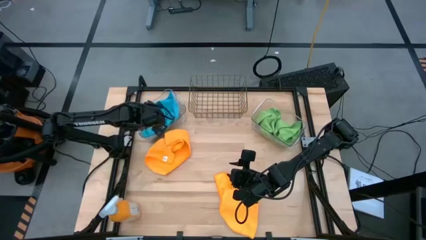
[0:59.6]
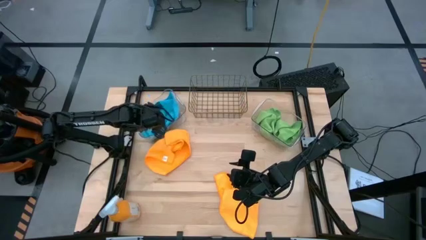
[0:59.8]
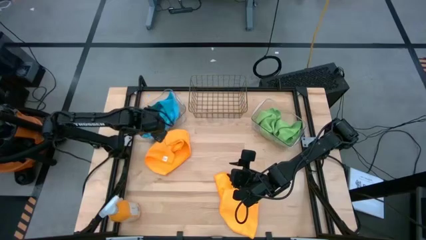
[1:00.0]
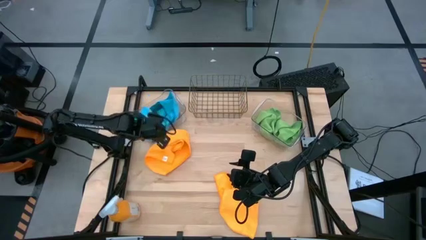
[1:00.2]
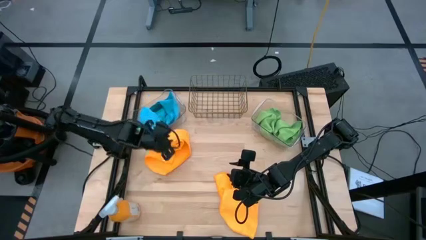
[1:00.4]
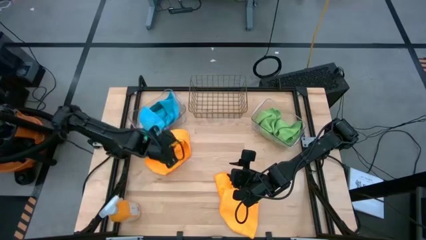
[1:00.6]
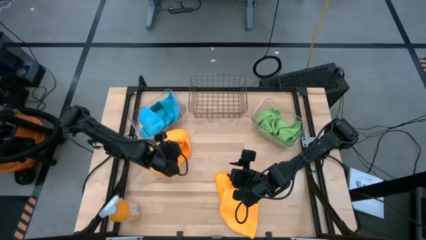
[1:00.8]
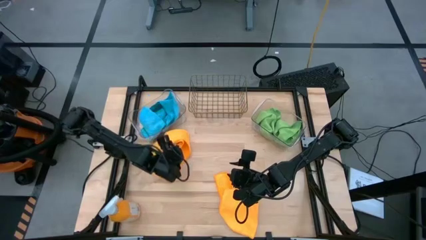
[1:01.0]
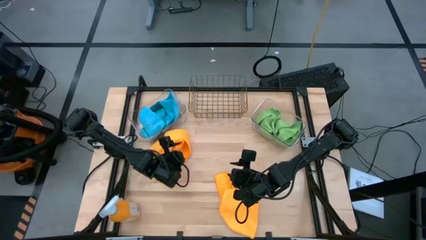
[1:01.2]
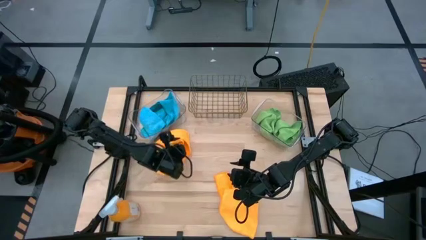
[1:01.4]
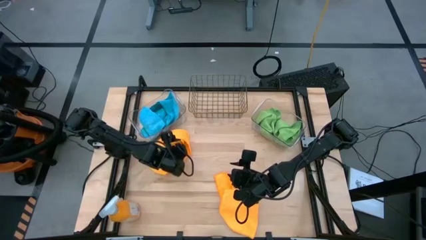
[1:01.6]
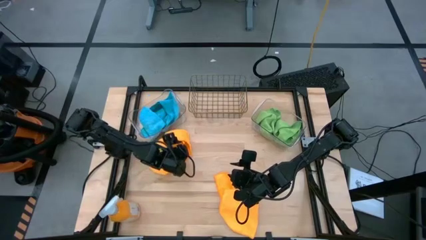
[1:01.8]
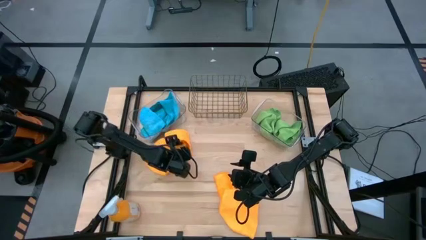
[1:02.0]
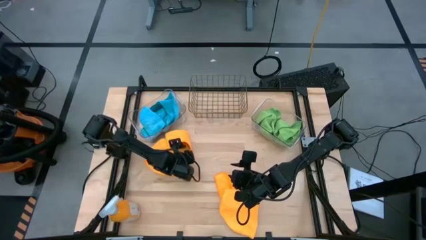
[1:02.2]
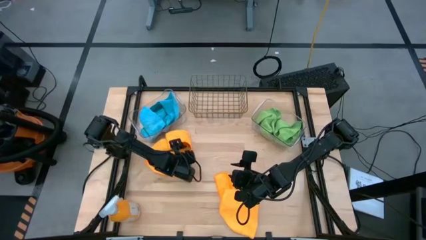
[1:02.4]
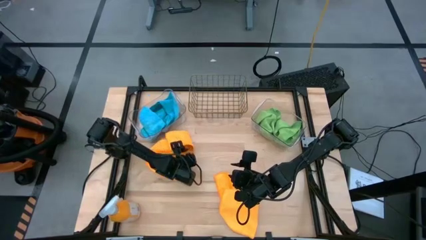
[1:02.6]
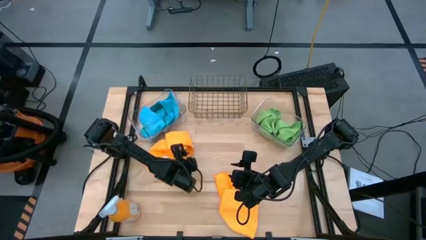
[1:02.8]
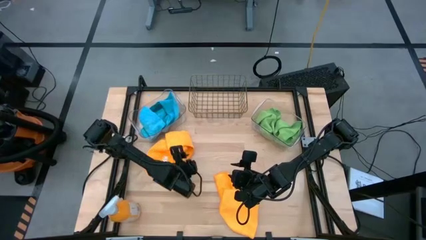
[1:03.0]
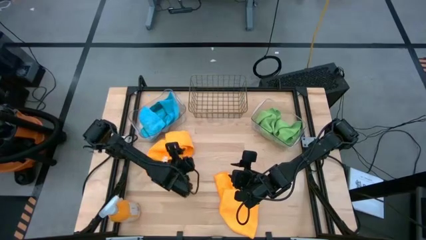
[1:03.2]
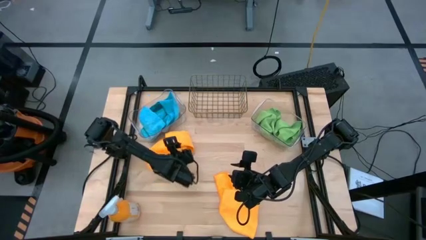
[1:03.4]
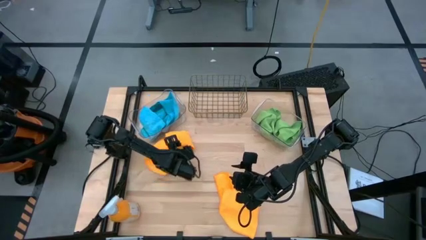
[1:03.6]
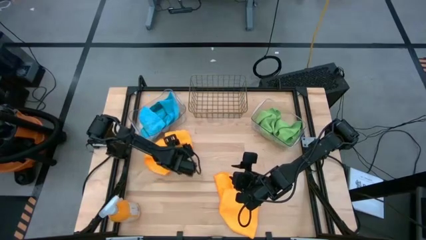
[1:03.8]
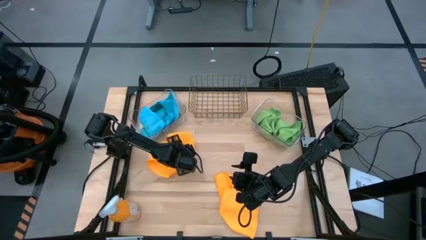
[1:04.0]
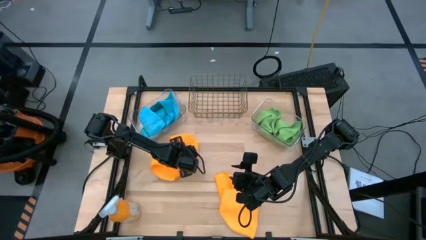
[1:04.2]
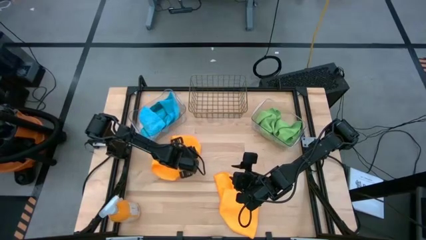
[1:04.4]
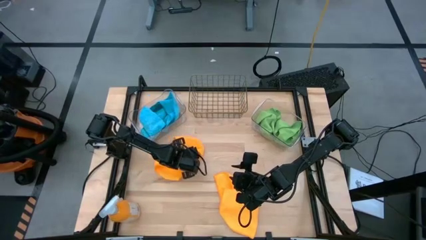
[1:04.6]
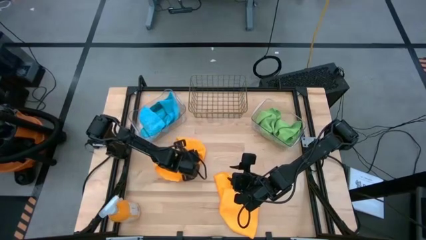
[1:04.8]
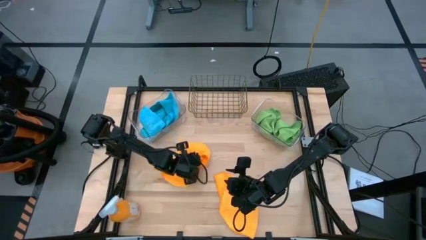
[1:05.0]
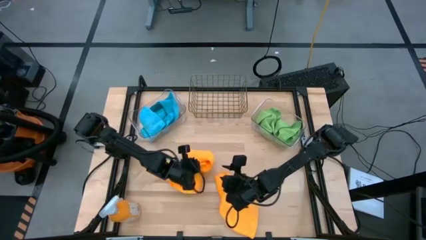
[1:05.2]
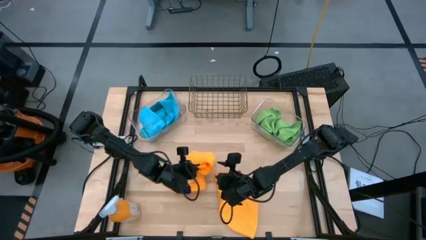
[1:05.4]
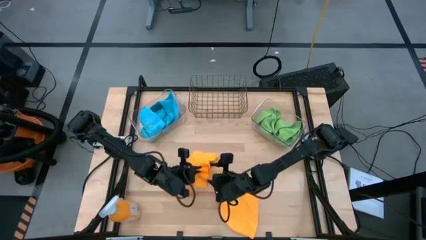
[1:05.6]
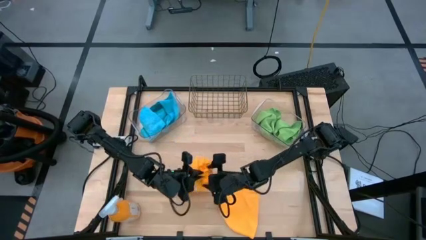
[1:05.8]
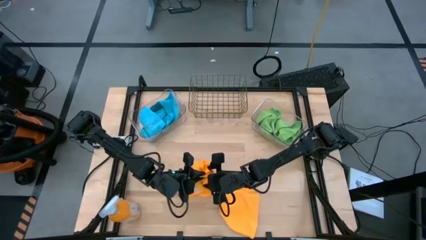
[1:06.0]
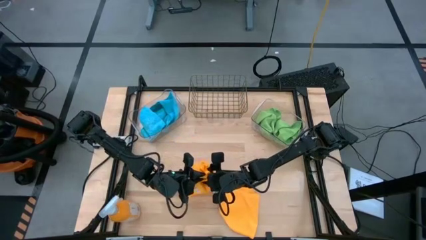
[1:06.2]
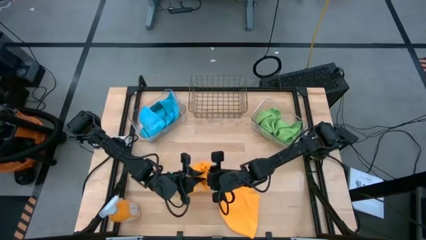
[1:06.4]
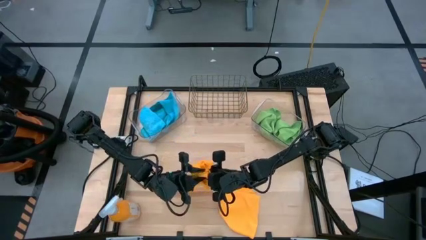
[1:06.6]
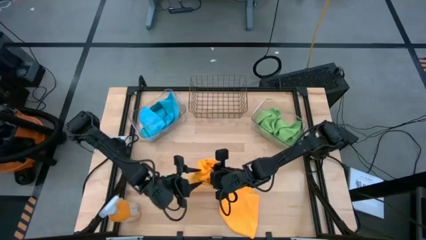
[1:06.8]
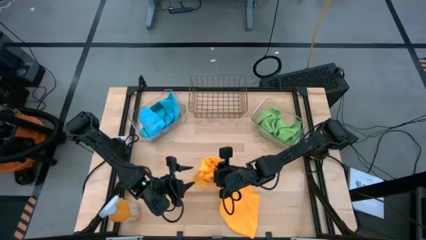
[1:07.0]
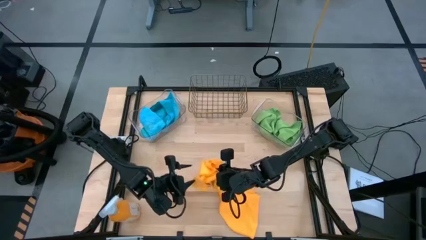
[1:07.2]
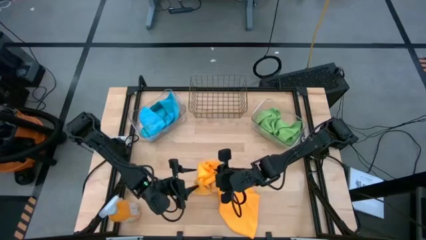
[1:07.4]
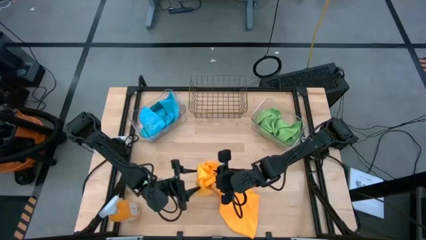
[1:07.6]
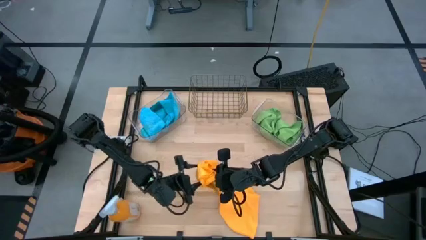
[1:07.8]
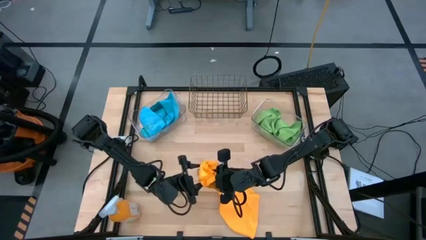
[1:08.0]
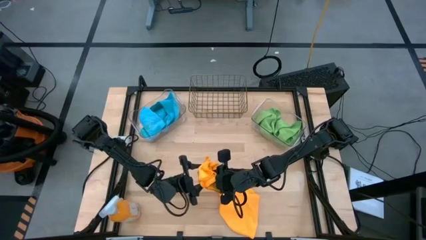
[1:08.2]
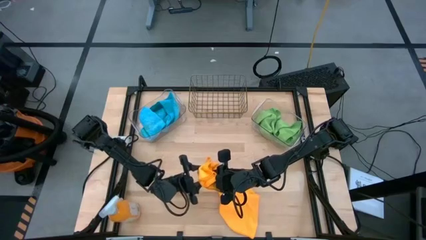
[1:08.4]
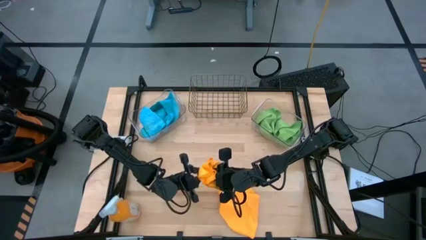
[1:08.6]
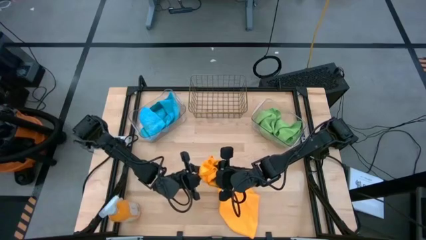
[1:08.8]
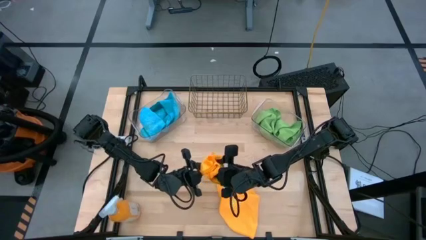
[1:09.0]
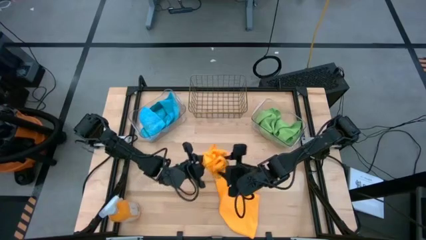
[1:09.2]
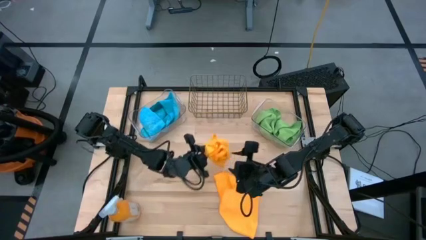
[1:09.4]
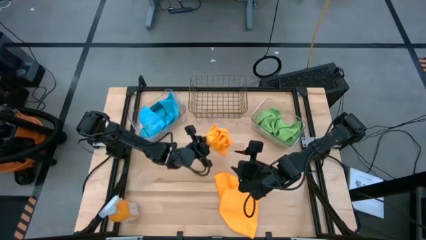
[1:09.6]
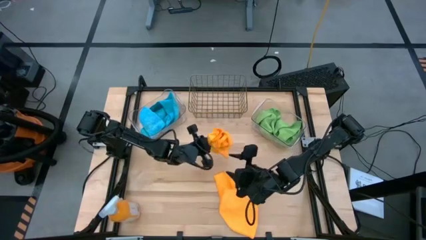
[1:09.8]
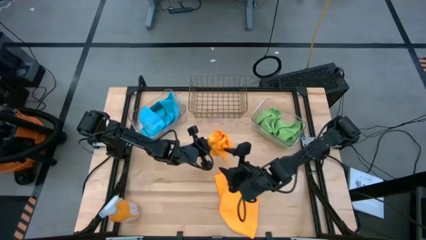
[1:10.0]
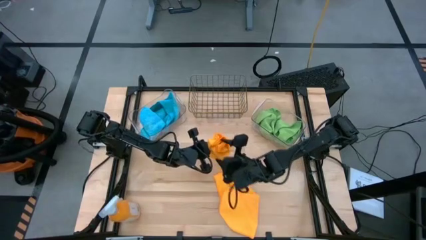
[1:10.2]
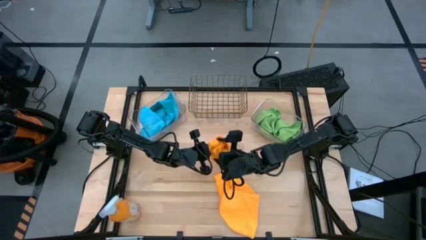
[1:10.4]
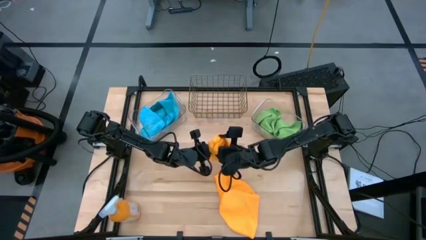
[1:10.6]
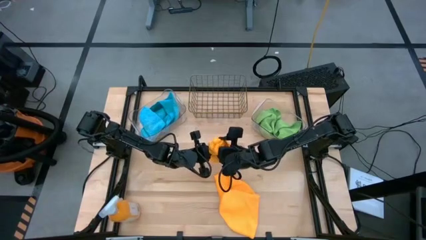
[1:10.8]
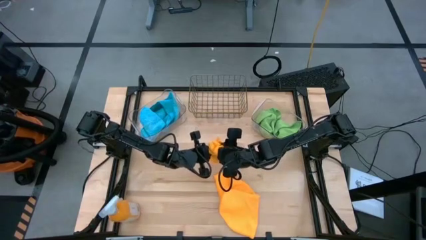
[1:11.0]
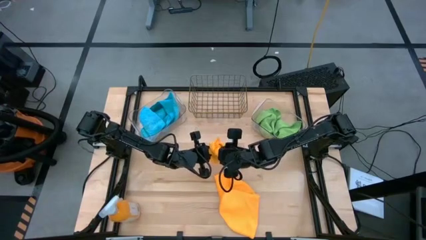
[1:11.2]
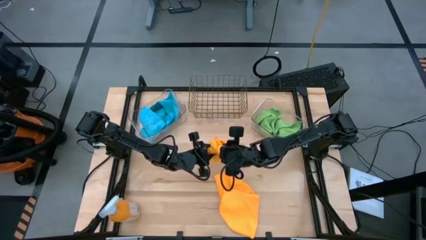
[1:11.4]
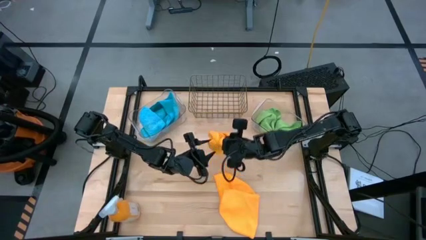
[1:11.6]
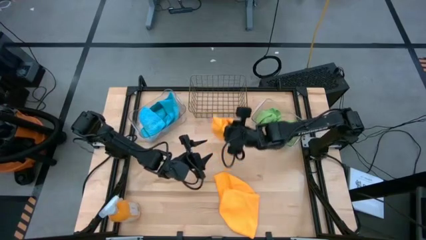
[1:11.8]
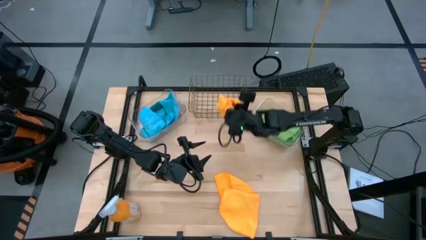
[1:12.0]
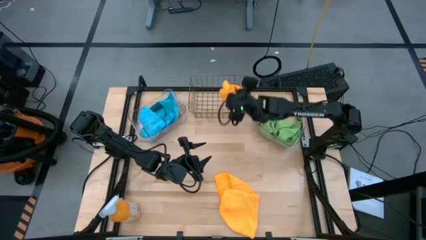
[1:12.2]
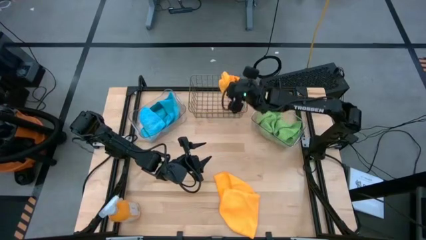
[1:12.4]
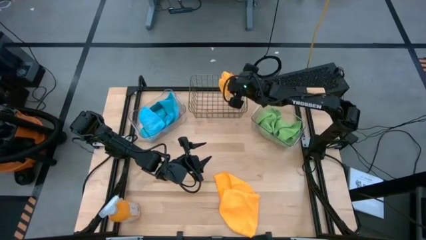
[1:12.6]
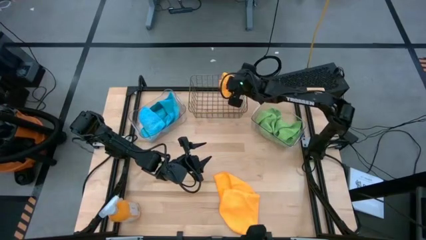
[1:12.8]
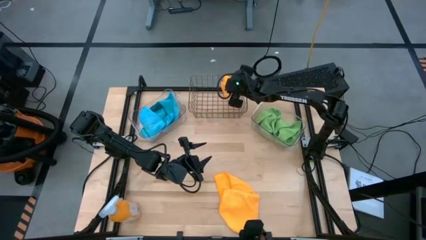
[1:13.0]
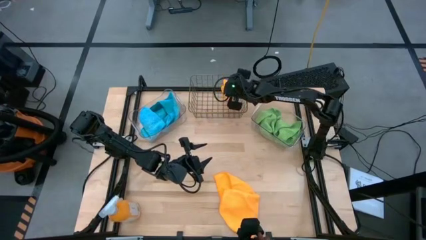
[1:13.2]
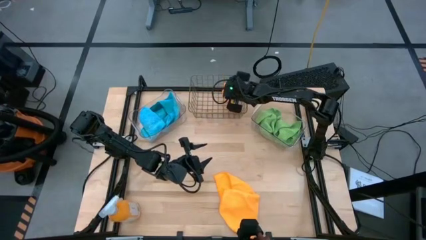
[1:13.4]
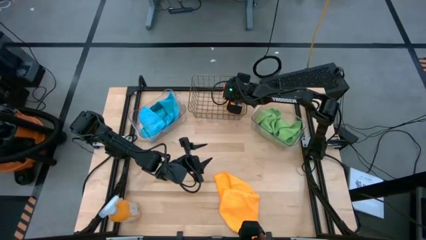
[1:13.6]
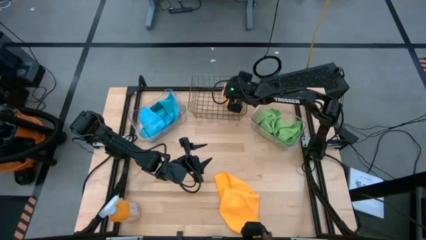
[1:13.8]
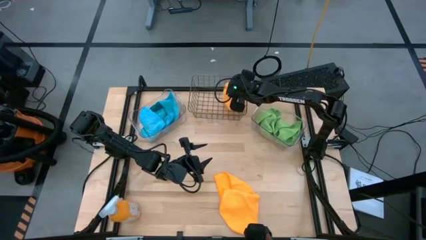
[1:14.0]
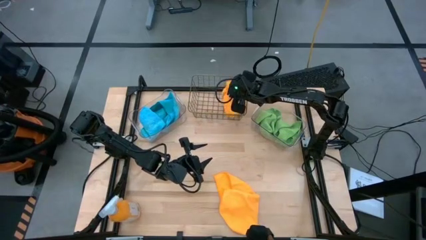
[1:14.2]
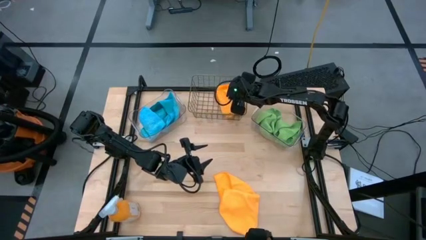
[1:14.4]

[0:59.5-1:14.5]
Task: Sort microfiber towel by color & place in baskets
Put the left yellow towel into the wire basket
